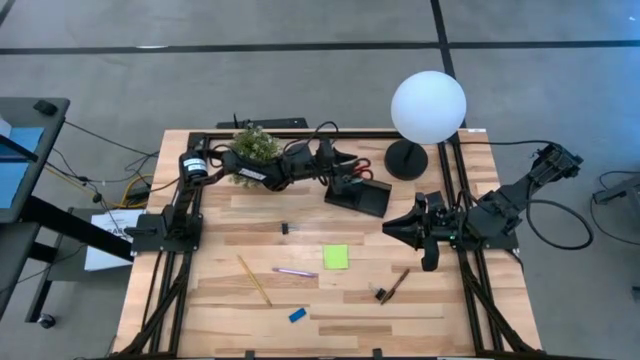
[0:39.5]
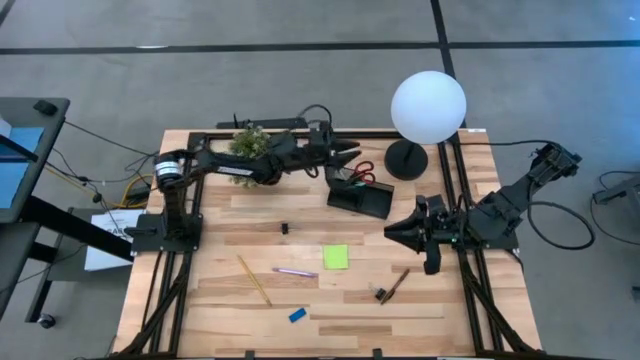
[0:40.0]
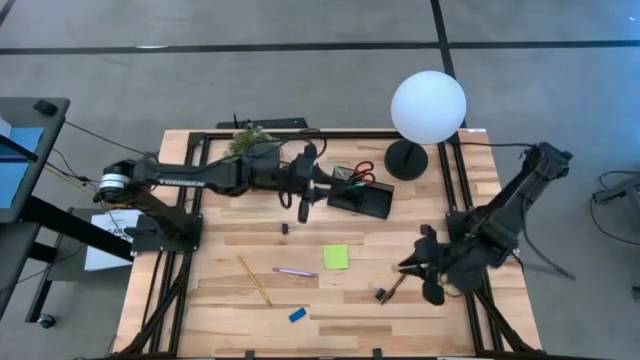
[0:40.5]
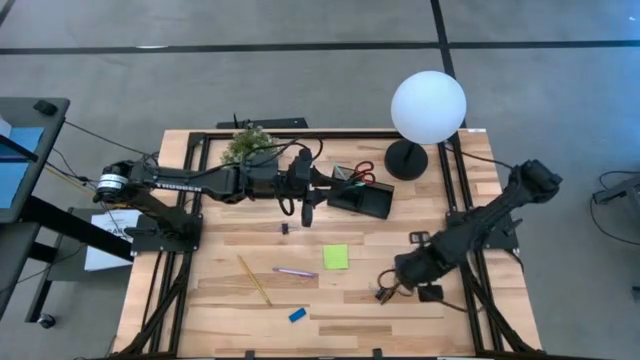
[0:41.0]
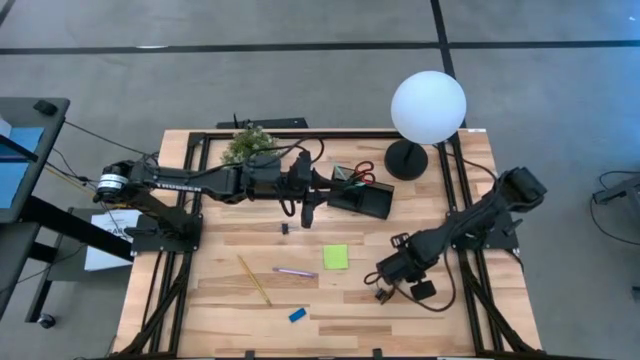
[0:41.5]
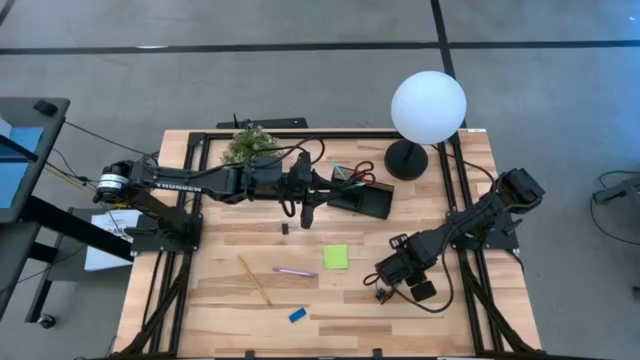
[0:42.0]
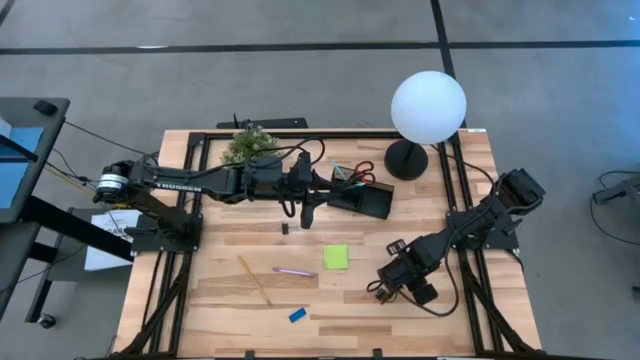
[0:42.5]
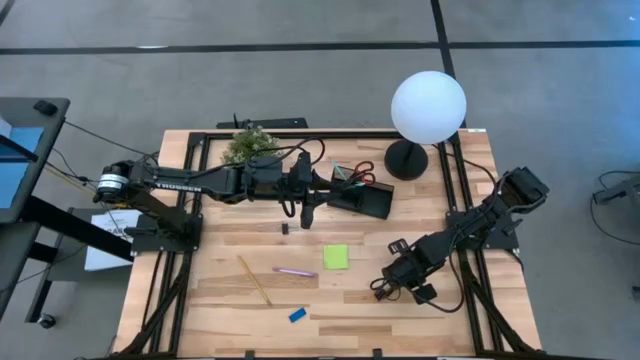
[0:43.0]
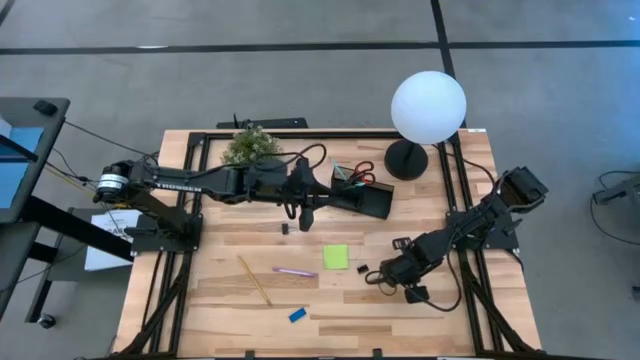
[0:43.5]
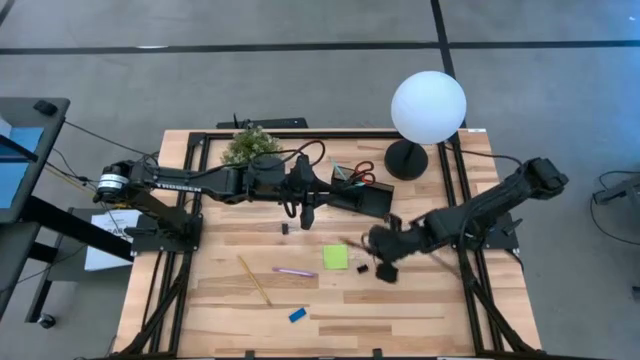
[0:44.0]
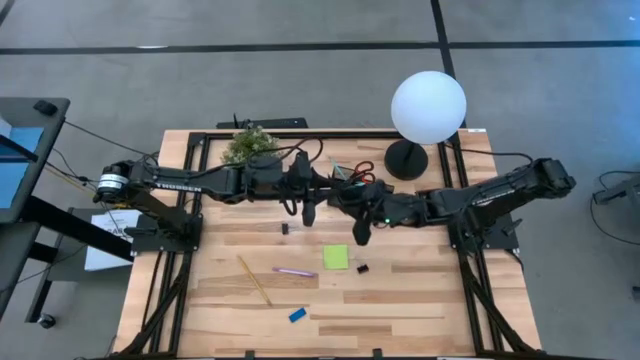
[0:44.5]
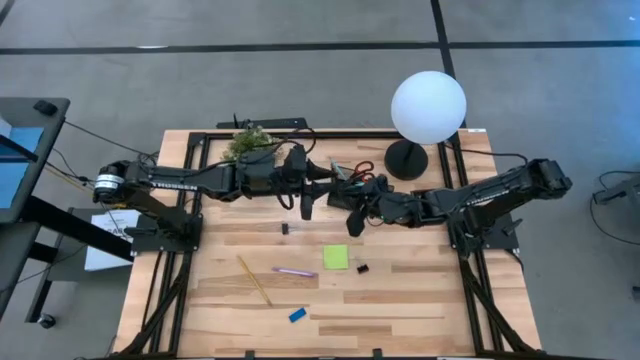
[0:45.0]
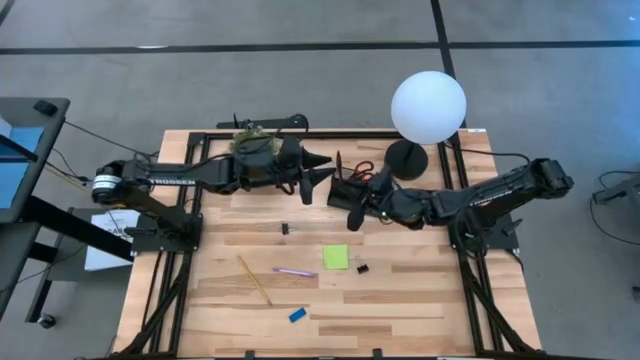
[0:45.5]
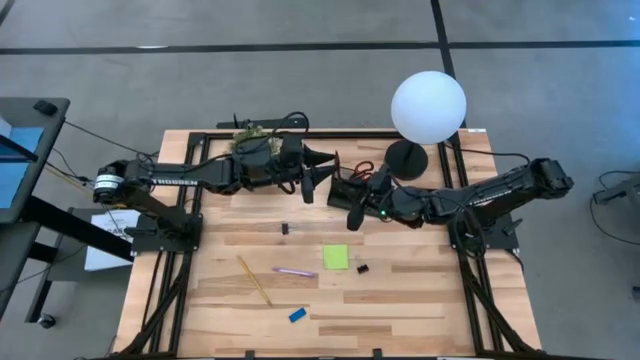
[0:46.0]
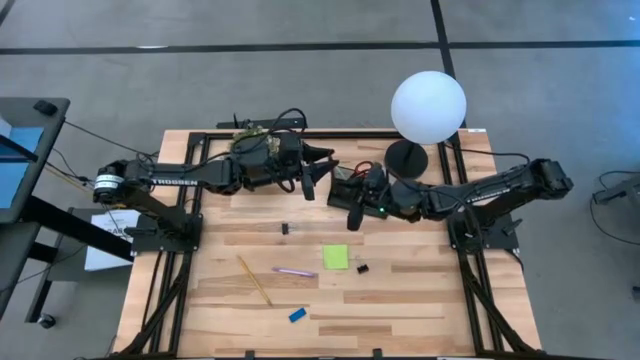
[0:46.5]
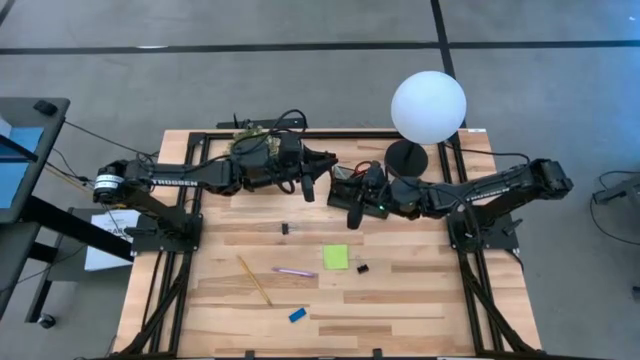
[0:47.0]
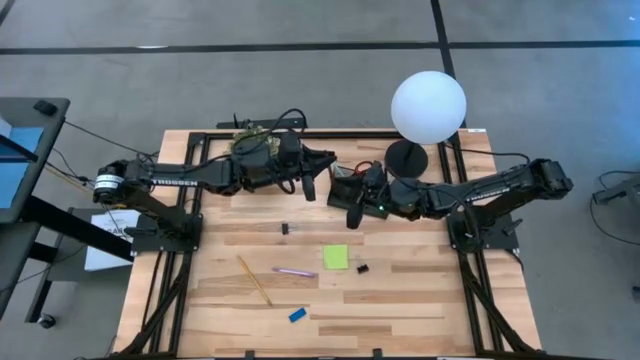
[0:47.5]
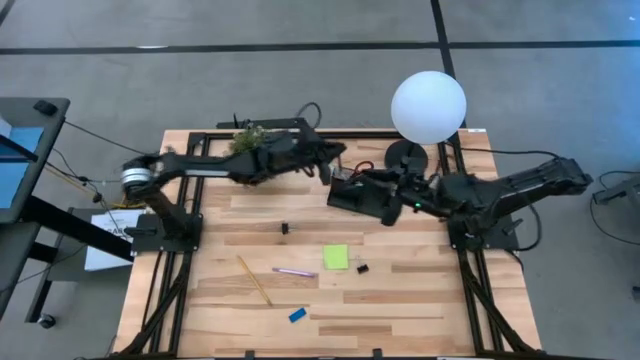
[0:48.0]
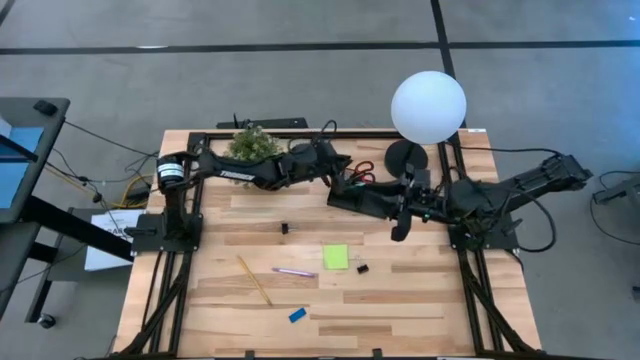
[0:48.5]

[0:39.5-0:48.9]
Task: Pick and place office supplies into organizer
Put the brown pen into the black desk organizer

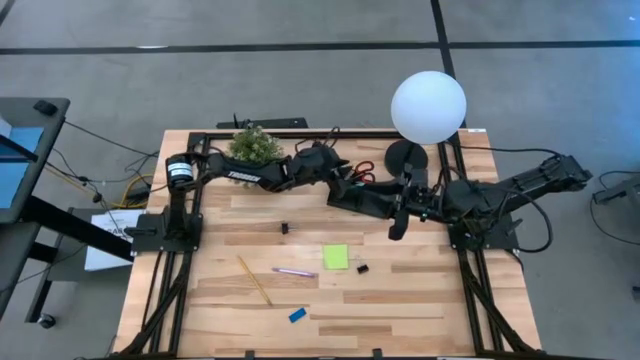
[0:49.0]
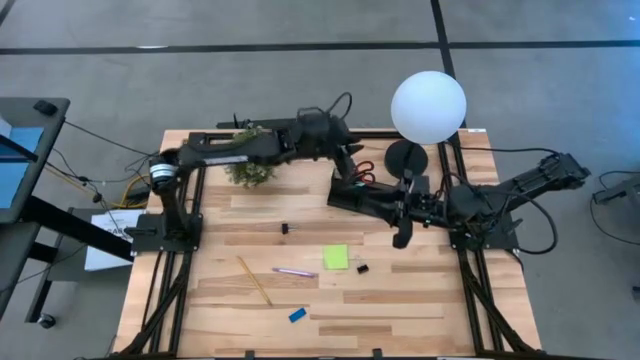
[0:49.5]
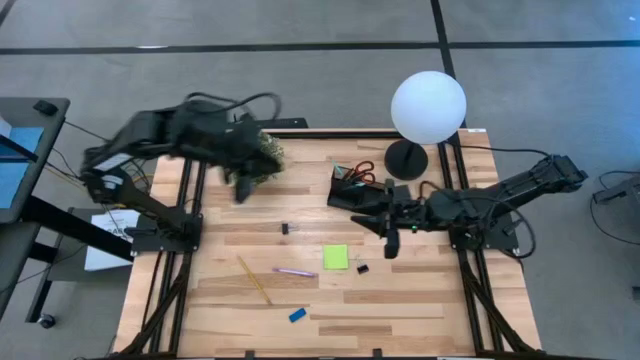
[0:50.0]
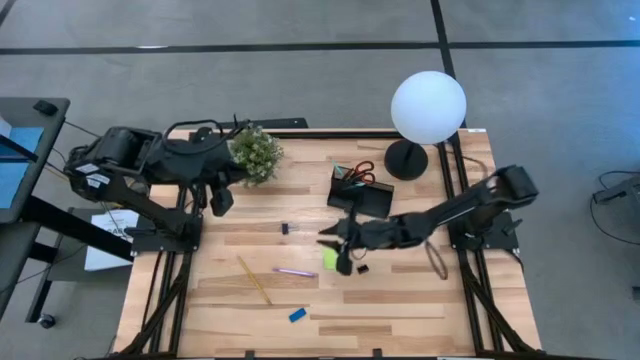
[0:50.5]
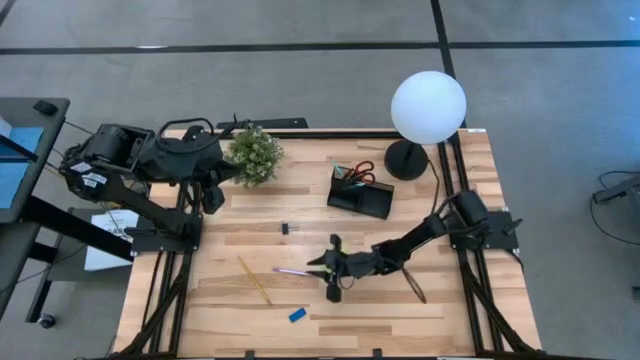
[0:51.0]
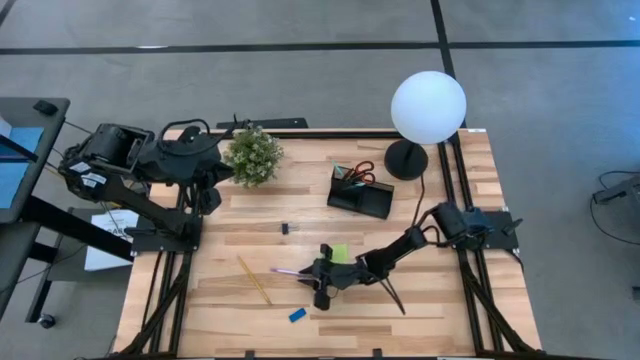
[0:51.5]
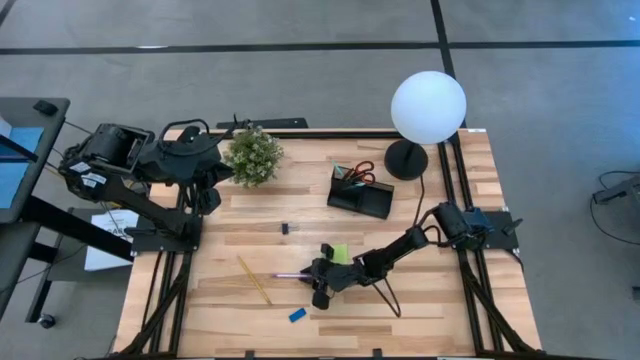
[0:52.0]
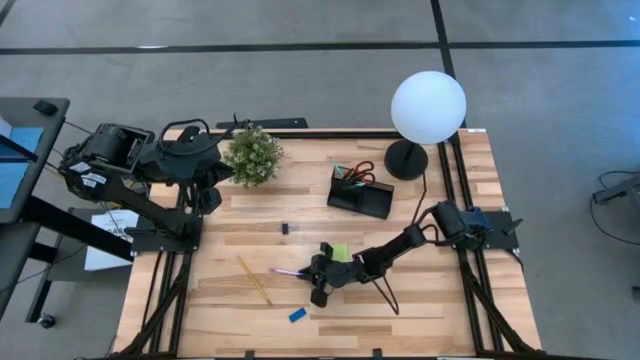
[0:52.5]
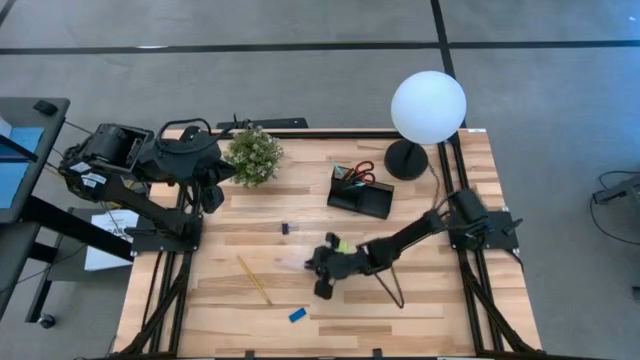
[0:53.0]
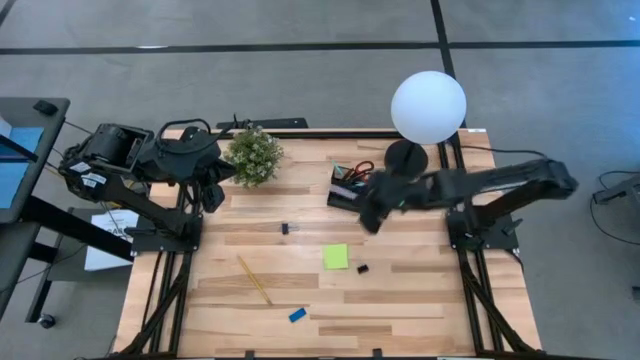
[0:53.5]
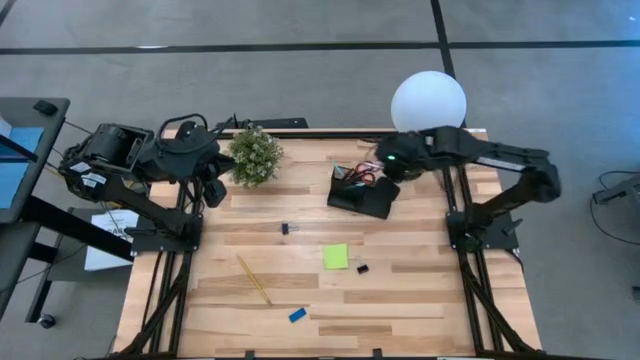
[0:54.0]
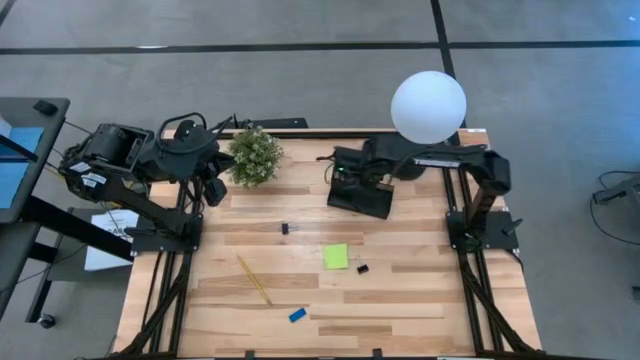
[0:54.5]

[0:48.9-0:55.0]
Put the purple pen into the black desk organizer

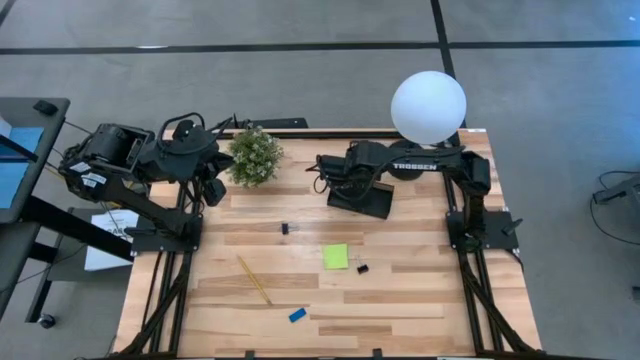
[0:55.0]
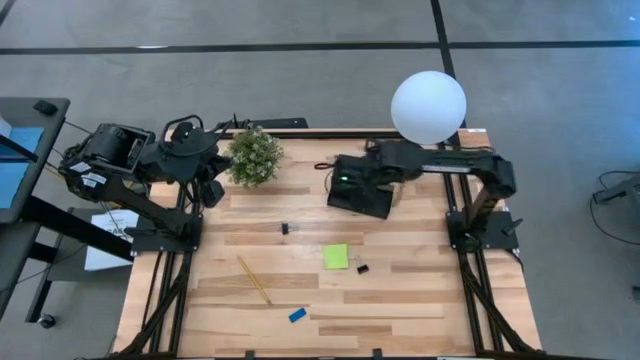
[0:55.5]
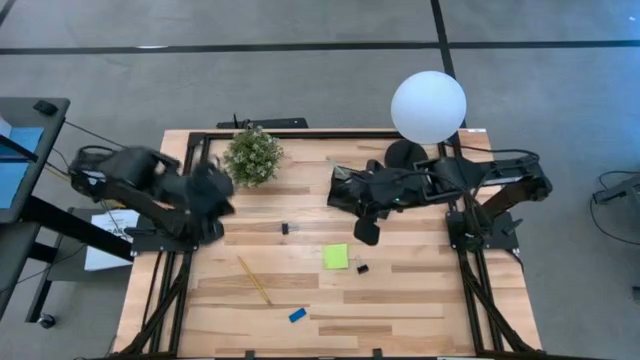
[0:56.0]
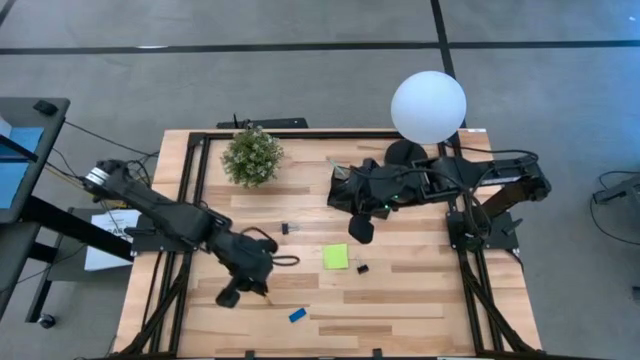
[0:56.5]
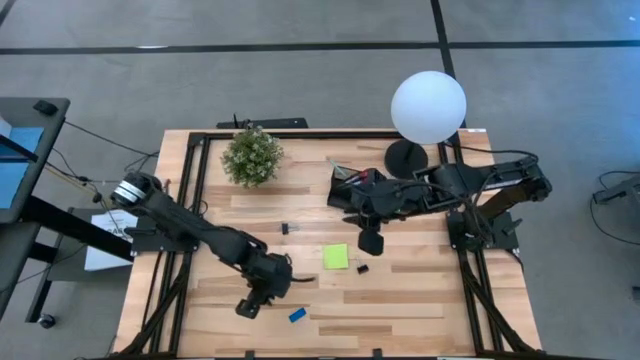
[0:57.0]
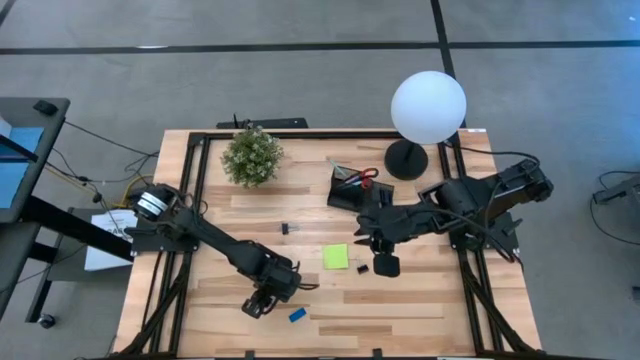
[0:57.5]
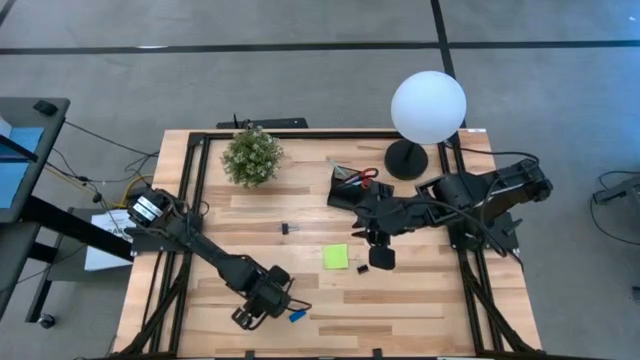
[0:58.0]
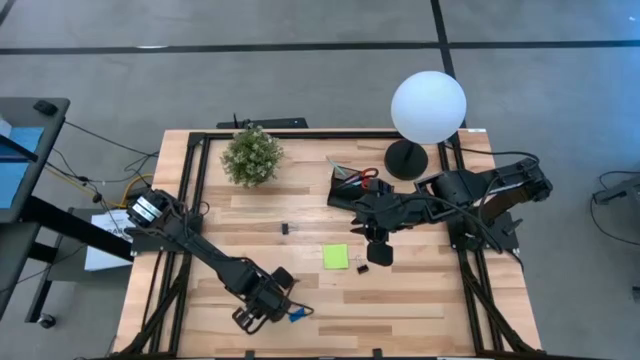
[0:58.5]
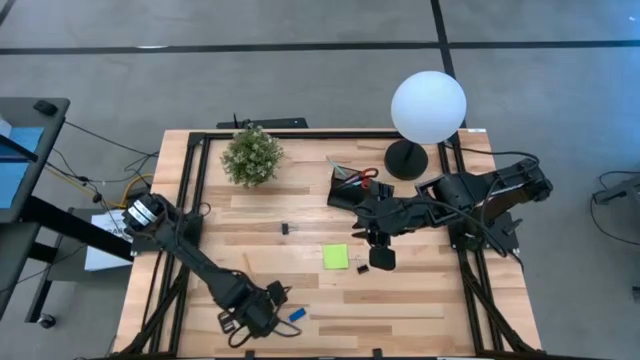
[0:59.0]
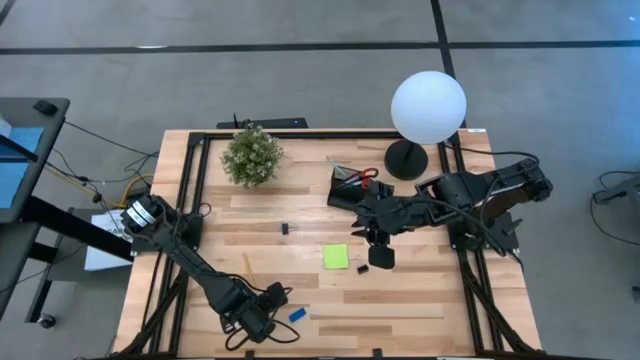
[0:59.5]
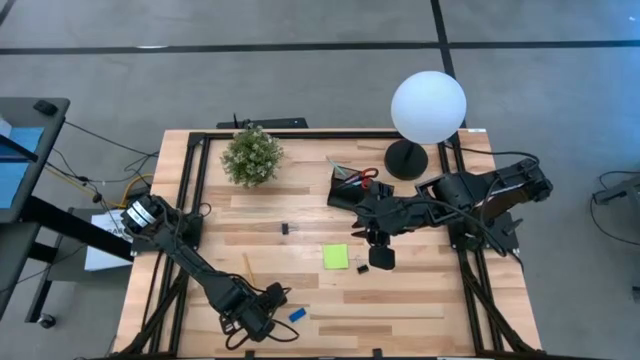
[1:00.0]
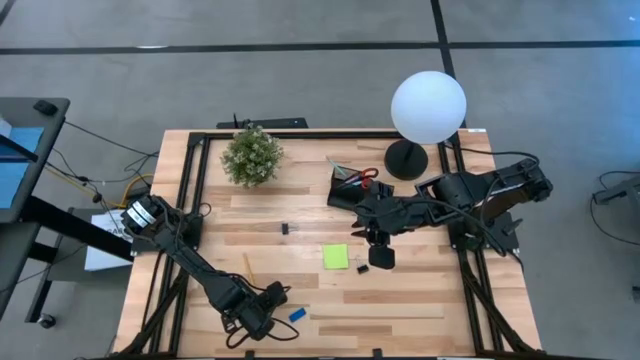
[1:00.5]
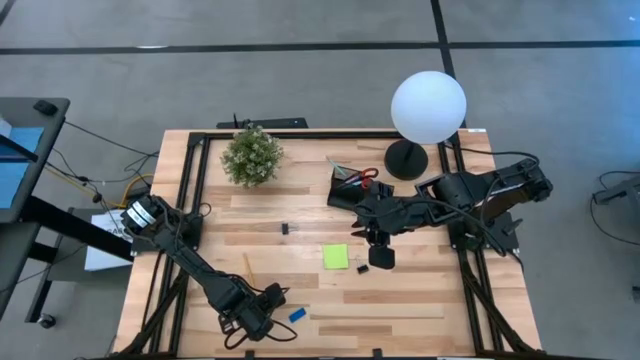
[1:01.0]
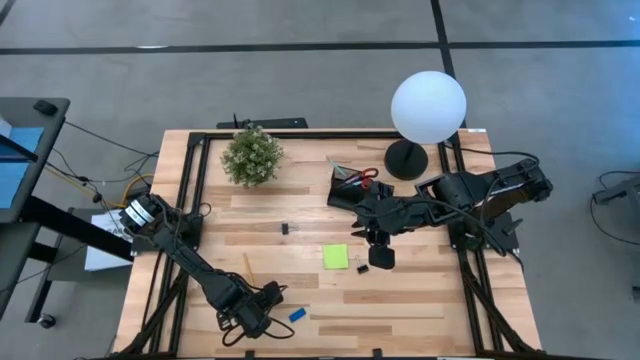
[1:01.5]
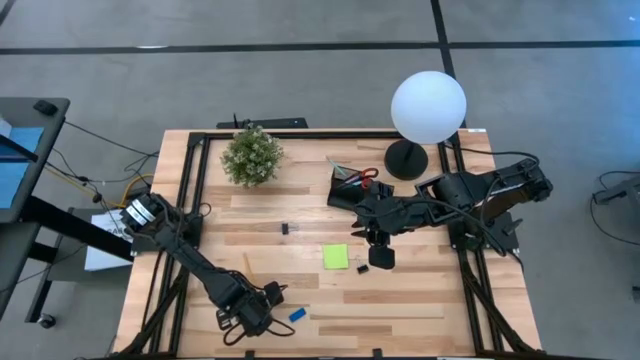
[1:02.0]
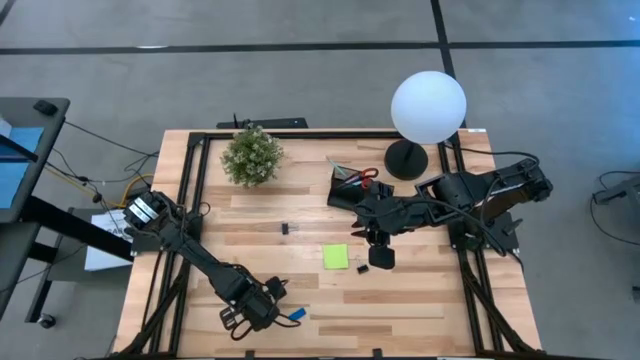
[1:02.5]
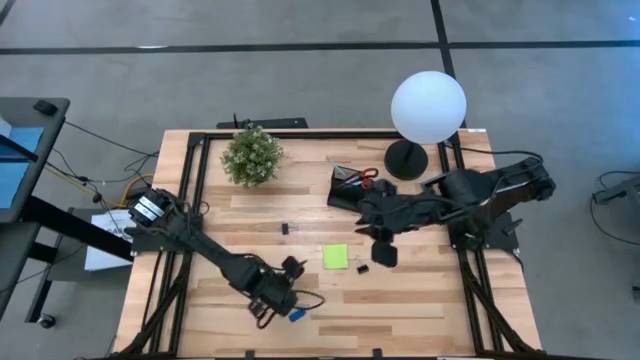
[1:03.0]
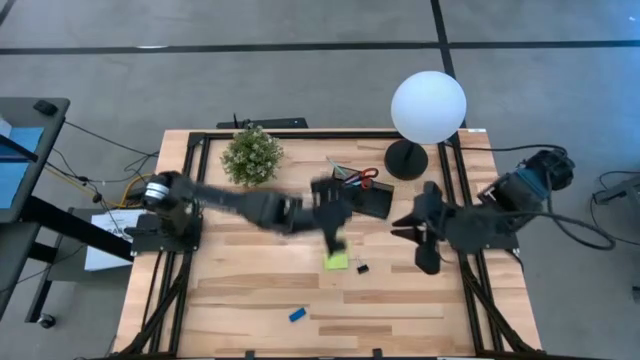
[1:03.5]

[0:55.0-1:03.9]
Put the yellow pencil into the black desk organizer
